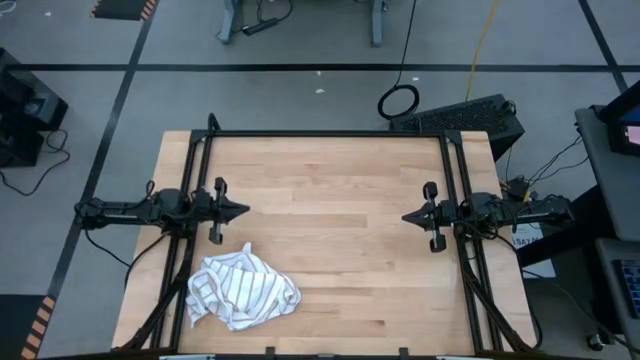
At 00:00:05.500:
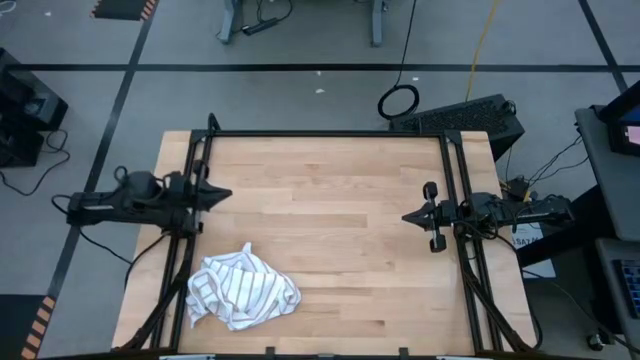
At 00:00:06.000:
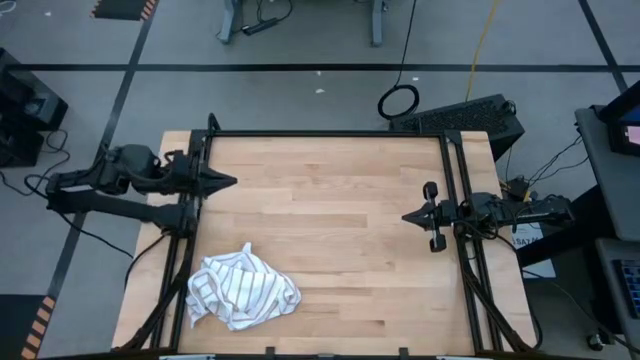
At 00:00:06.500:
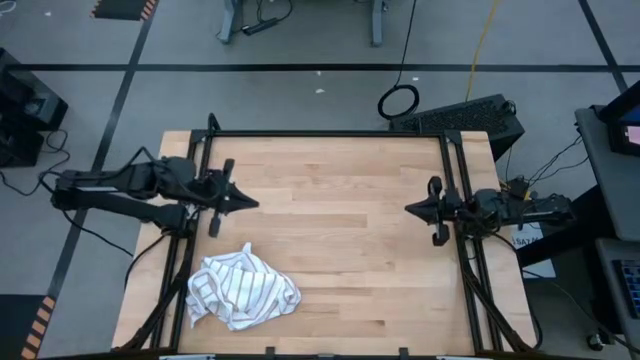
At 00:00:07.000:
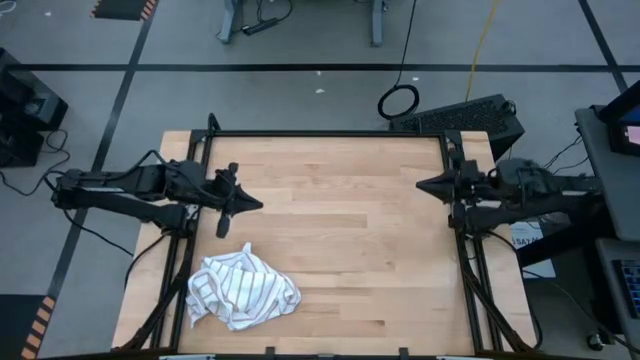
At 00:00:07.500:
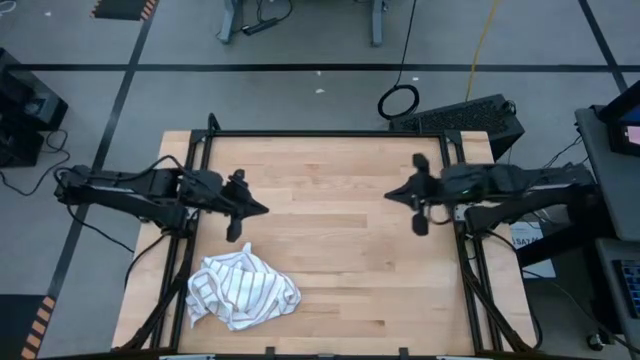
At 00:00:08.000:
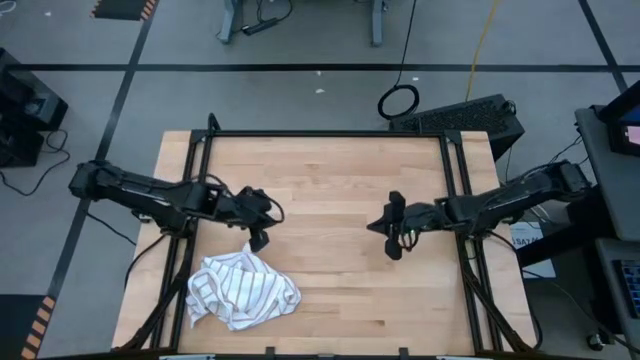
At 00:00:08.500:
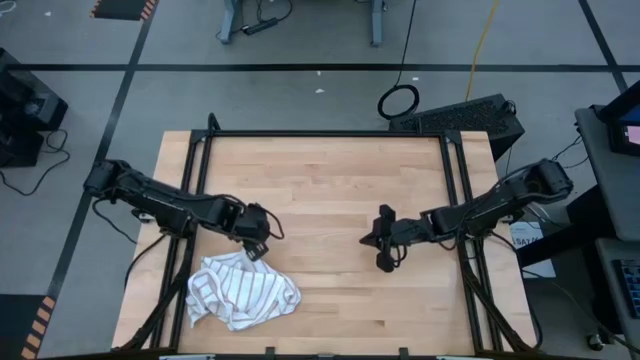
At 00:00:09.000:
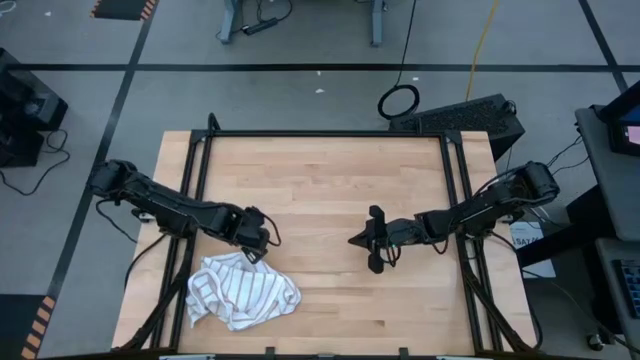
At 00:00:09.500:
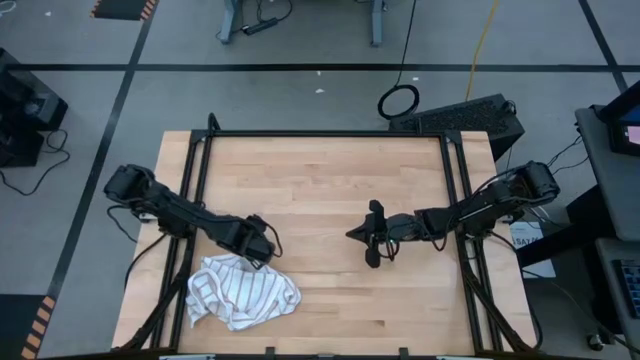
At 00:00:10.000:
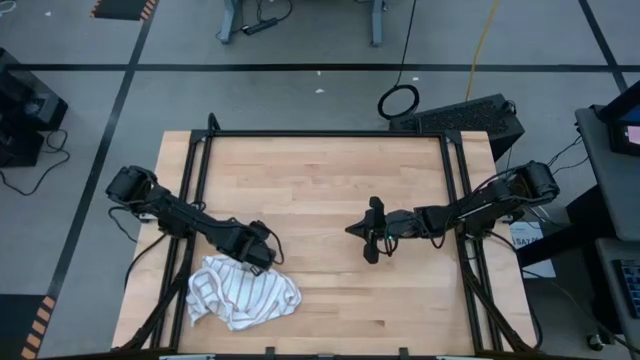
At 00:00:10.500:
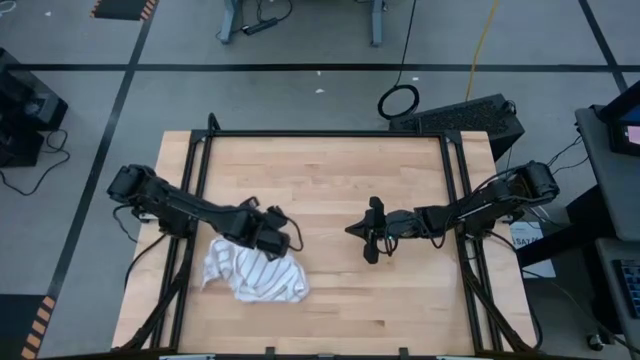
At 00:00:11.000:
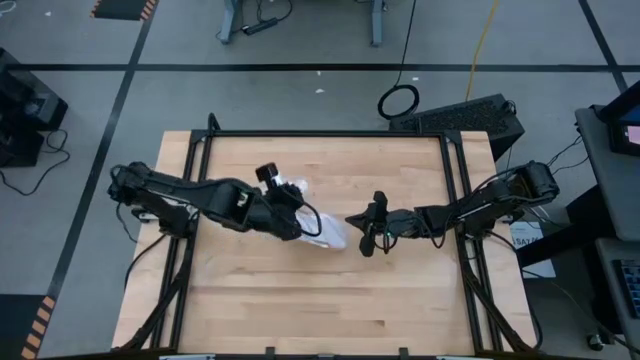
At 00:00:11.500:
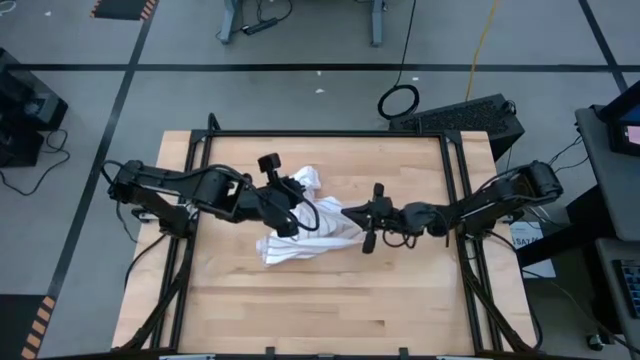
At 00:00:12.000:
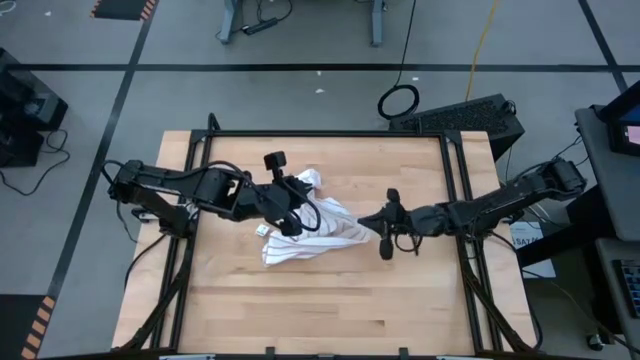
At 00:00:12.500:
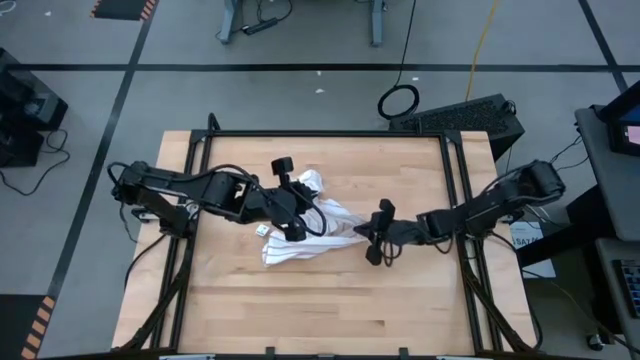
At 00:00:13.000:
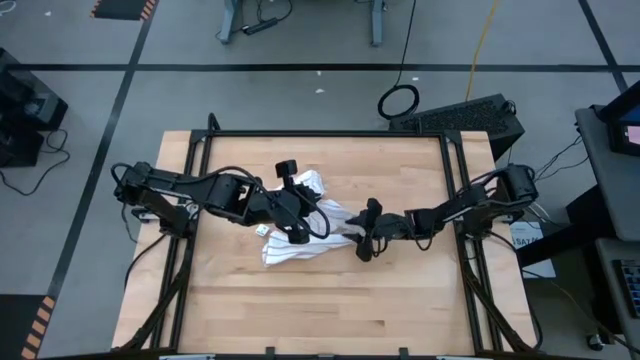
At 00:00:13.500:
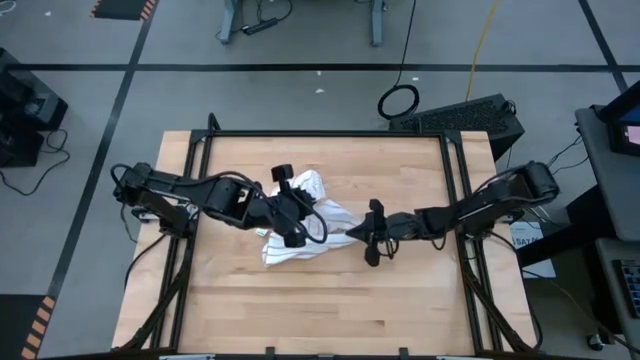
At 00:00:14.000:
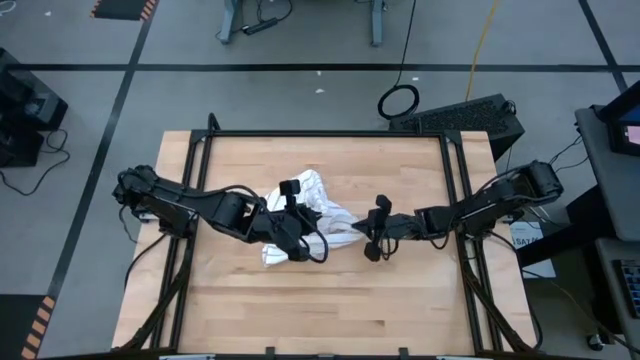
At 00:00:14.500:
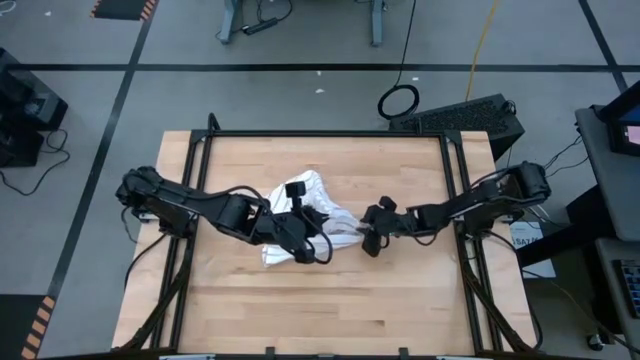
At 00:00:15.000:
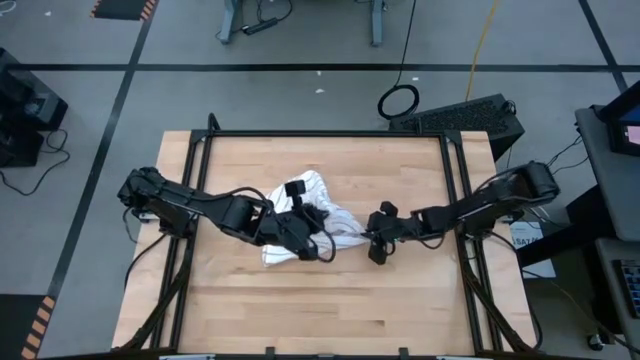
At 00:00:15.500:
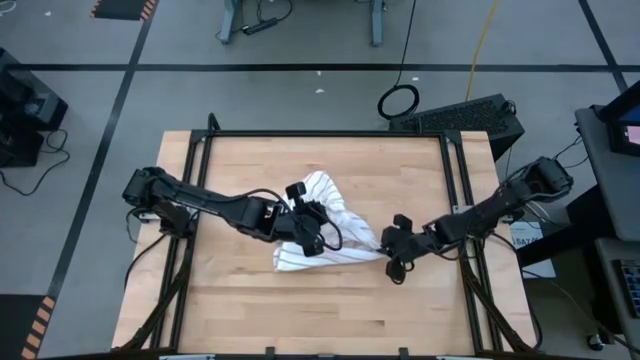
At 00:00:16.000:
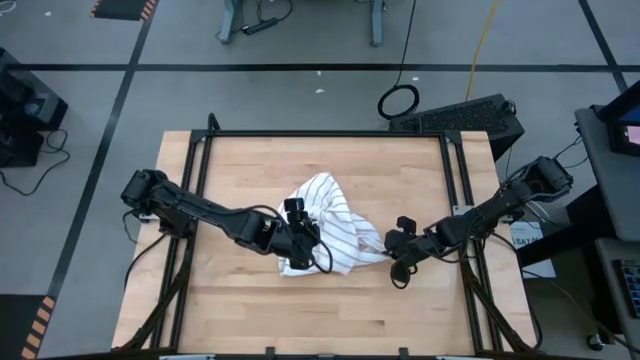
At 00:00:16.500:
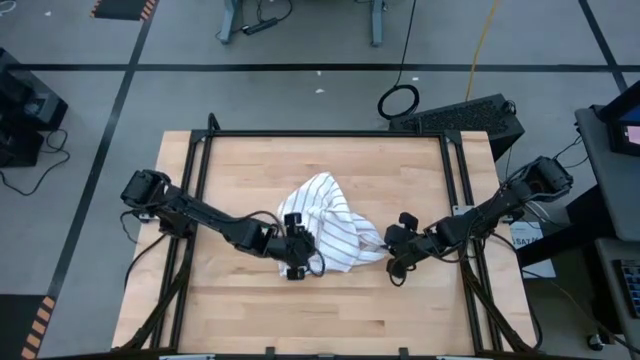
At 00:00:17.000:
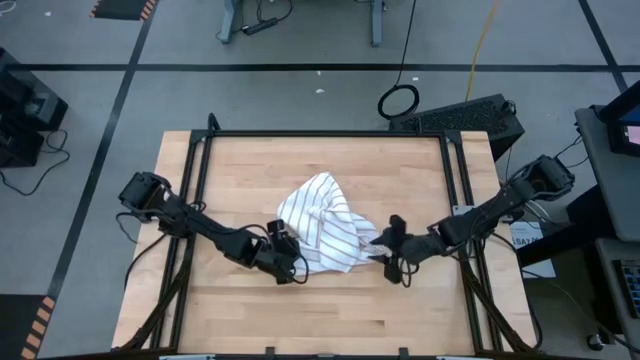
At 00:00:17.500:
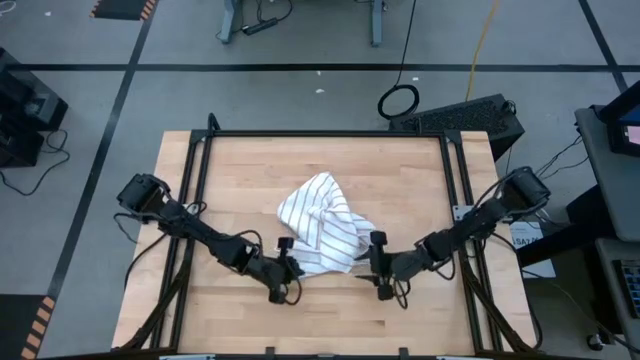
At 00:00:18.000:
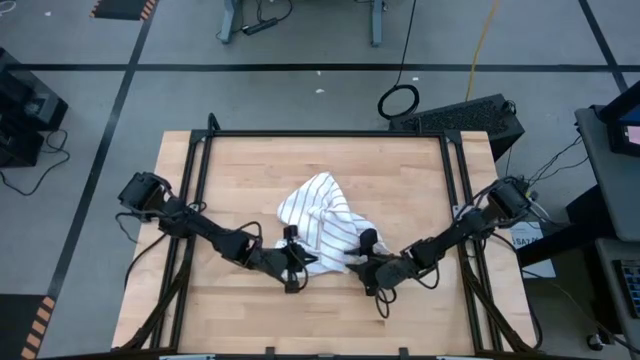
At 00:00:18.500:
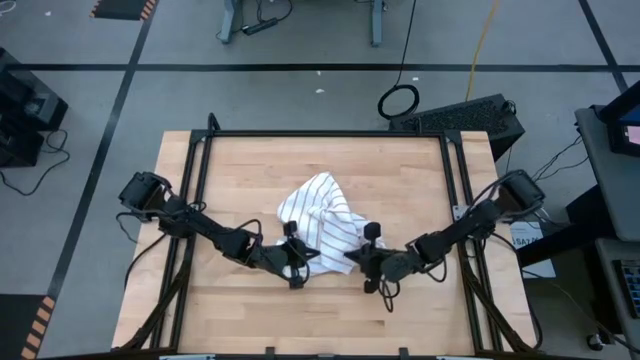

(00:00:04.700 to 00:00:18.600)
Task: Roll towel
Roll the white towel

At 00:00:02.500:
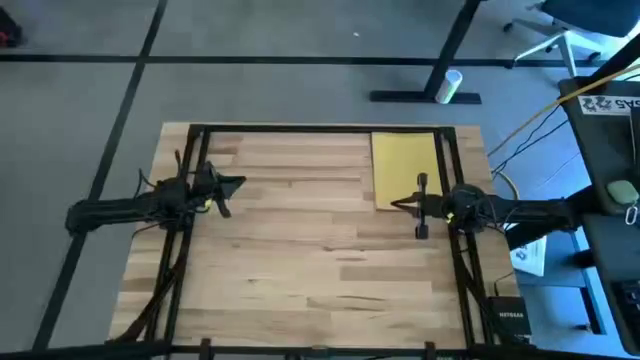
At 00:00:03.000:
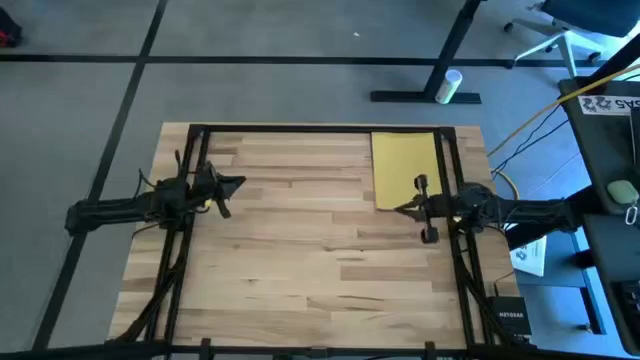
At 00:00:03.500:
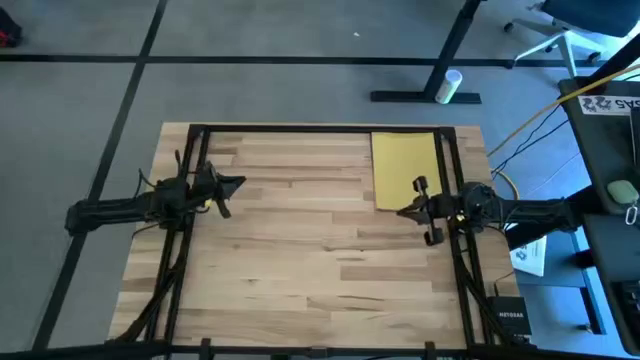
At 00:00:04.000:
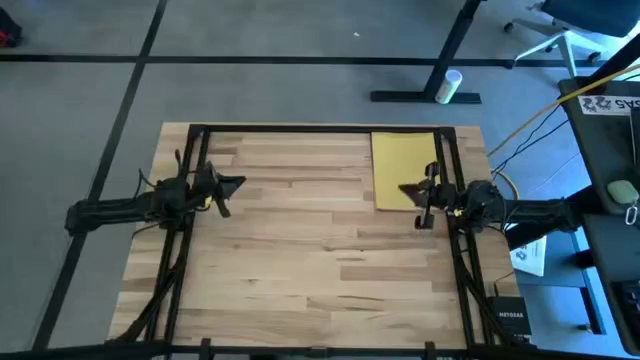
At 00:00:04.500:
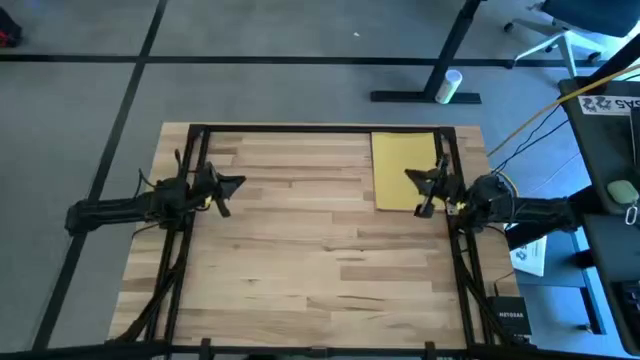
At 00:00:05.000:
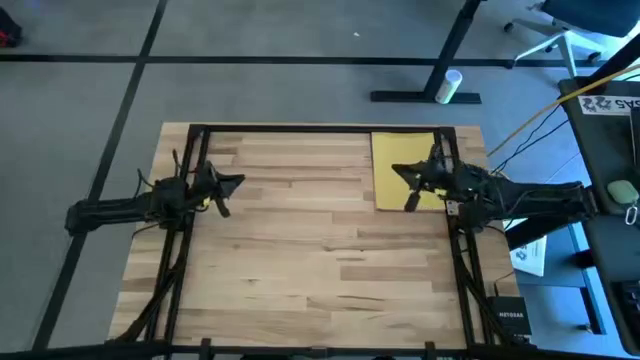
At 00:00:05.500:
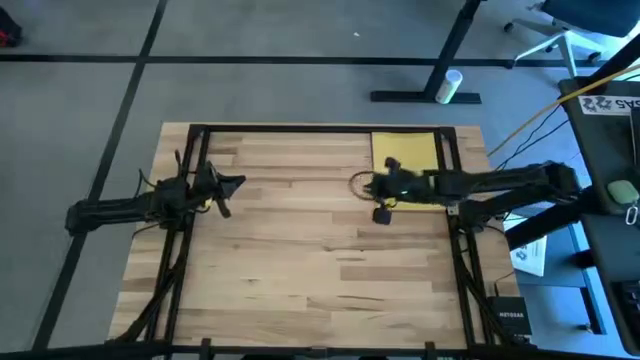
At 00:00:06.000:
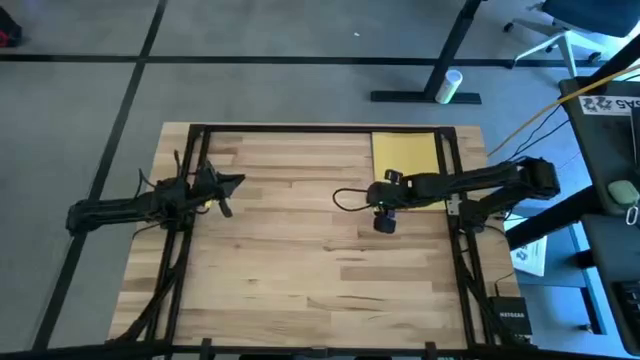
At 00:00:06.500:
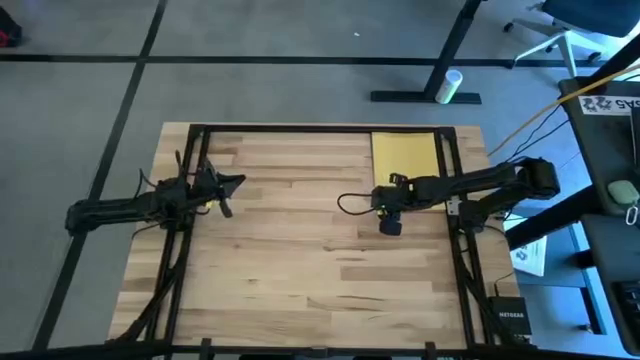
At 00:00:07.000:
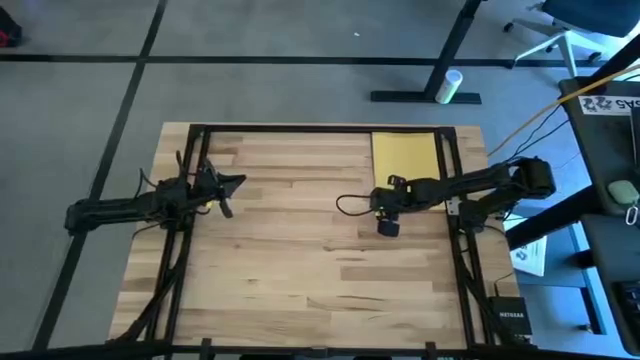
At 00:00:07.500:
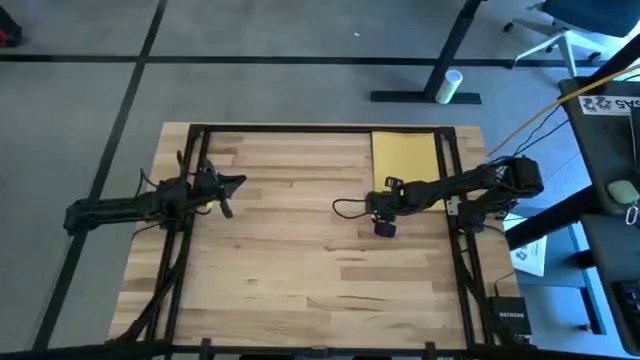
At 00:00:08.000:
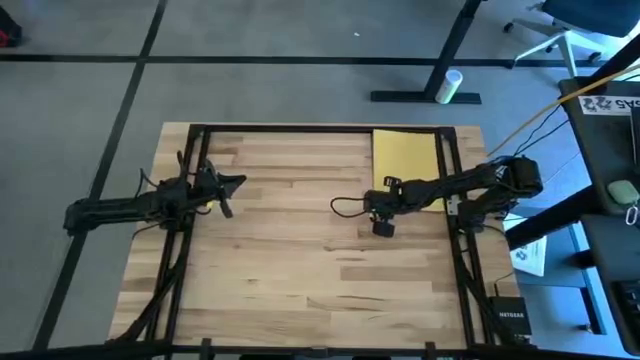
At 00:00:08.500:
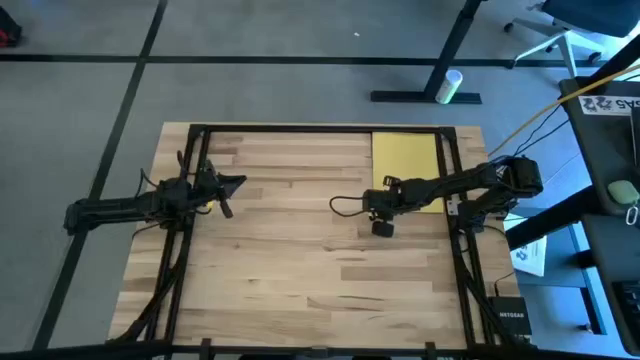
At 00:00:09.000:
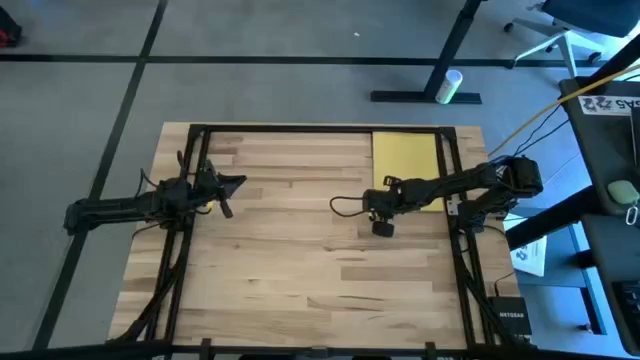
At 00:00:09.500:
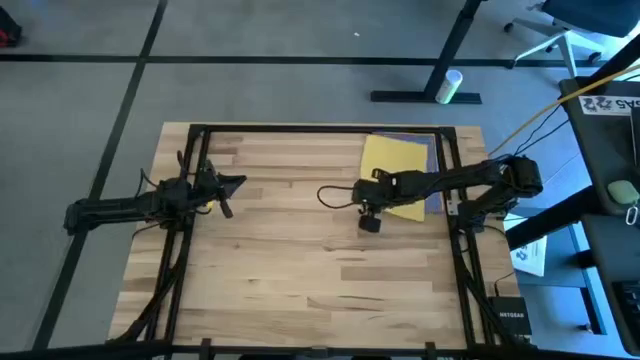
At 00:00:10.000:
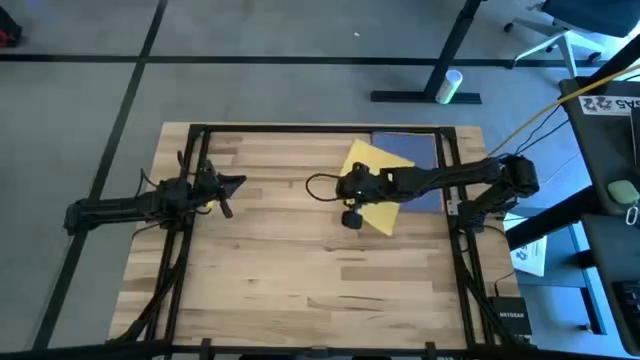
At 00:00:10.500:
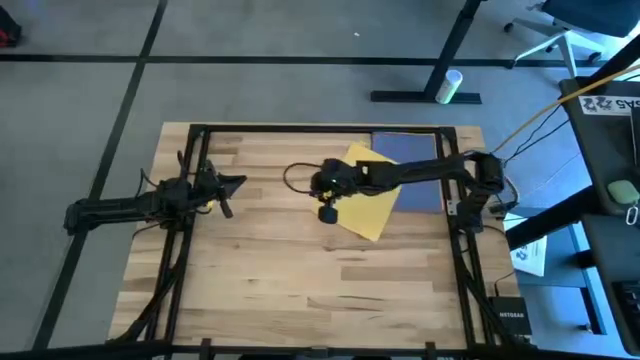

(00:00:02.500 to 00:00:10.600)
Task: Organize paper
Move the yellow paper to the top left of the table
